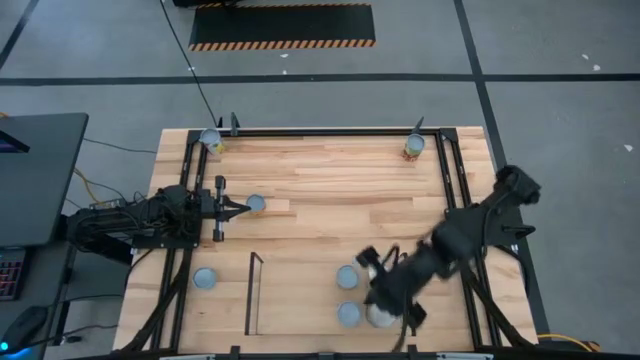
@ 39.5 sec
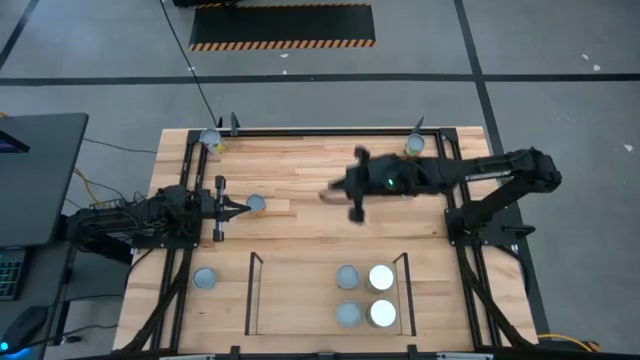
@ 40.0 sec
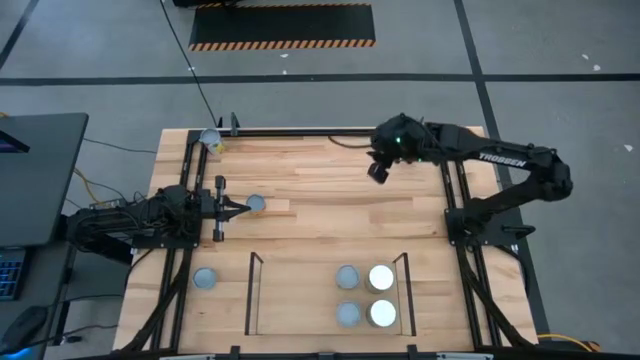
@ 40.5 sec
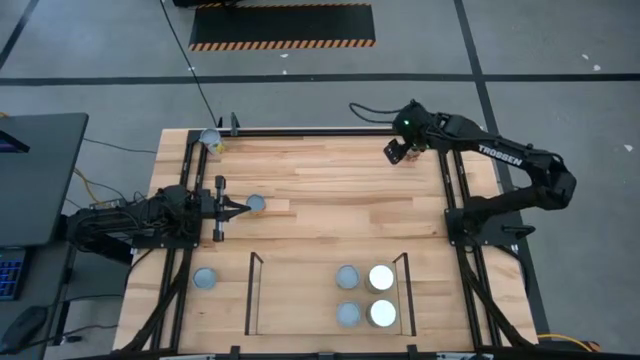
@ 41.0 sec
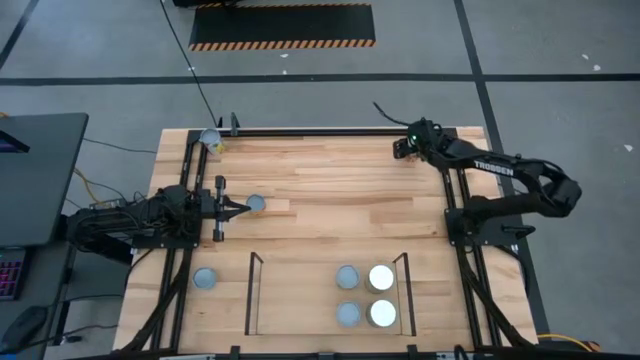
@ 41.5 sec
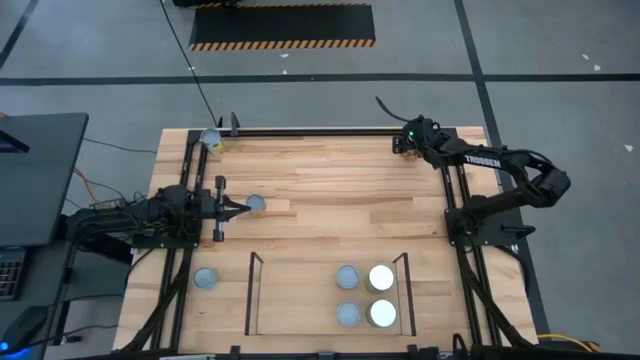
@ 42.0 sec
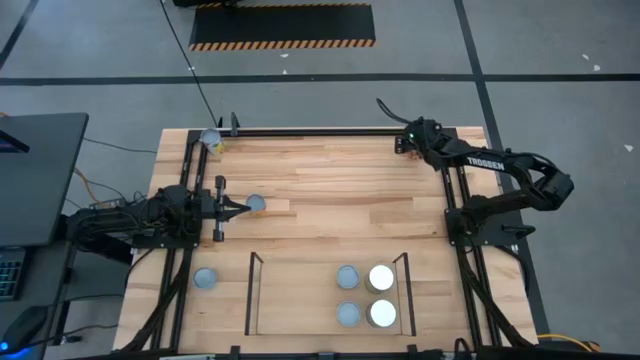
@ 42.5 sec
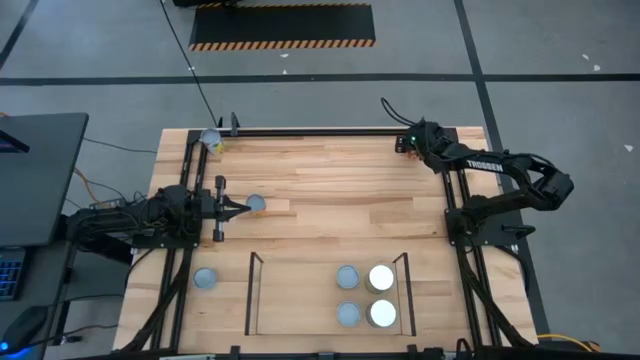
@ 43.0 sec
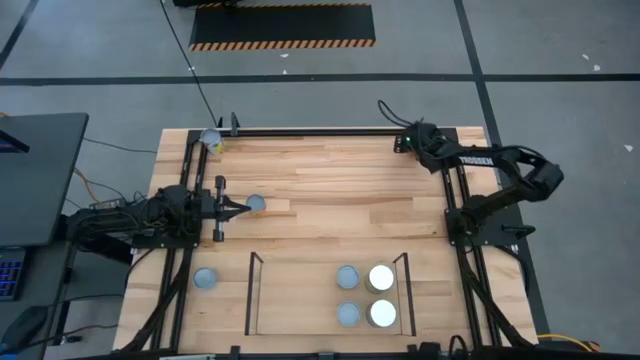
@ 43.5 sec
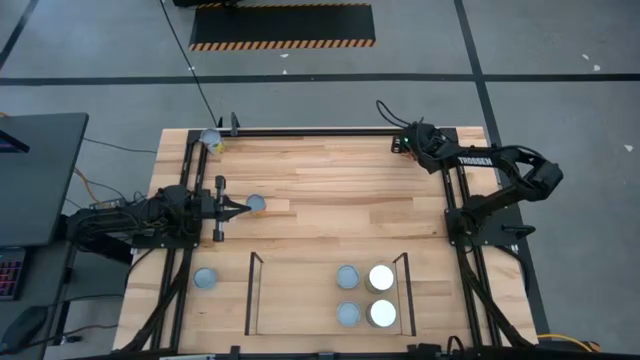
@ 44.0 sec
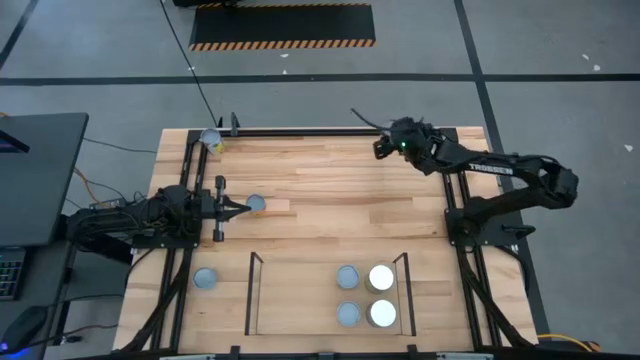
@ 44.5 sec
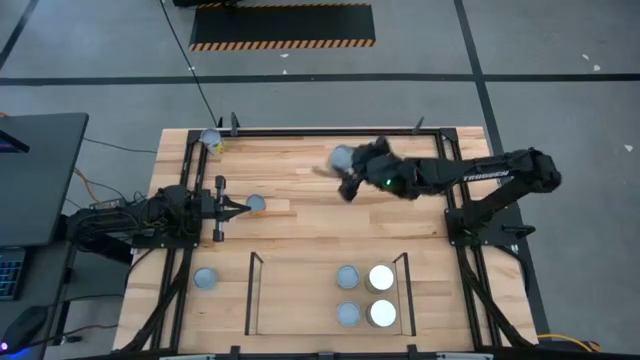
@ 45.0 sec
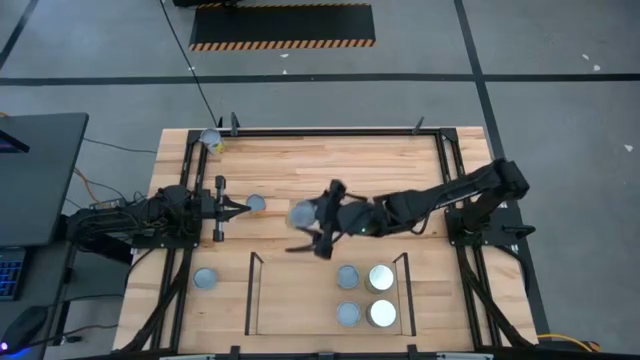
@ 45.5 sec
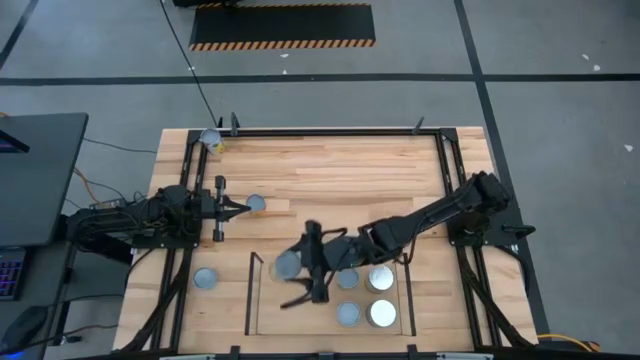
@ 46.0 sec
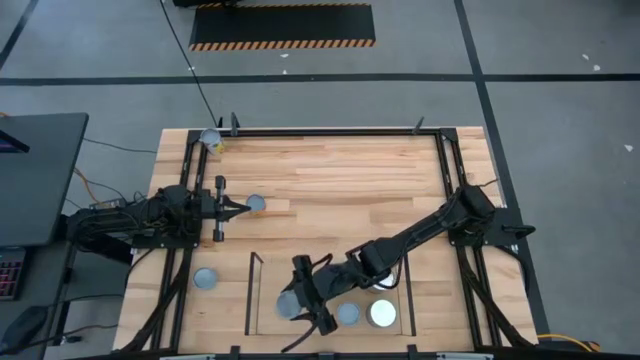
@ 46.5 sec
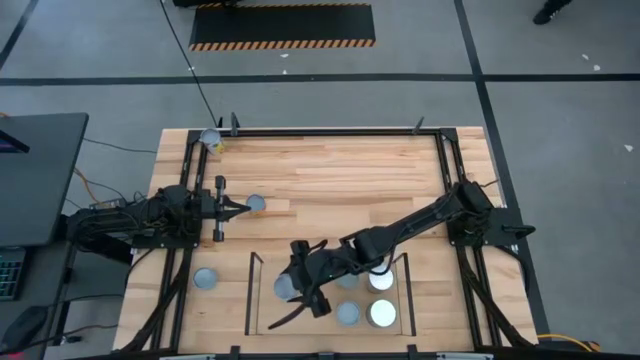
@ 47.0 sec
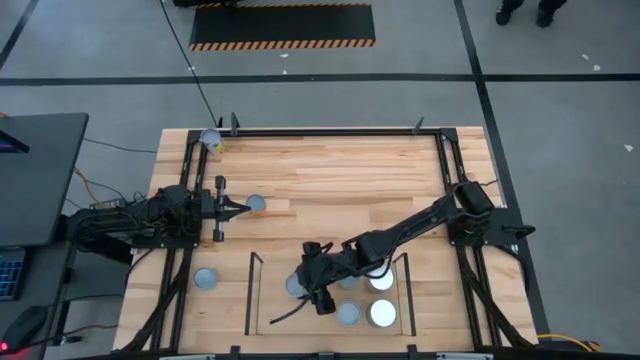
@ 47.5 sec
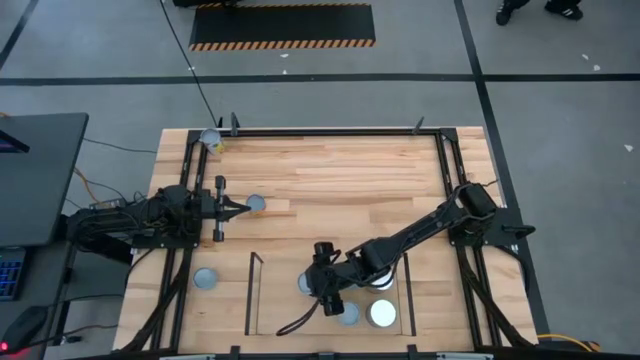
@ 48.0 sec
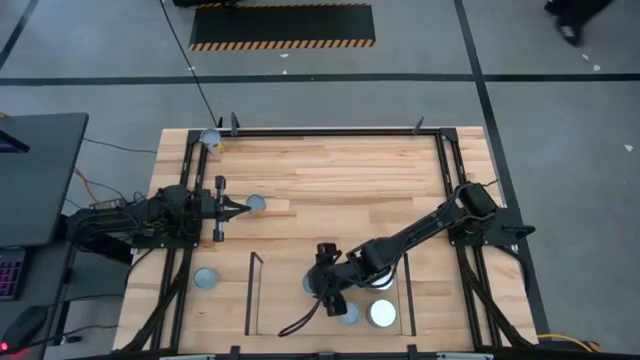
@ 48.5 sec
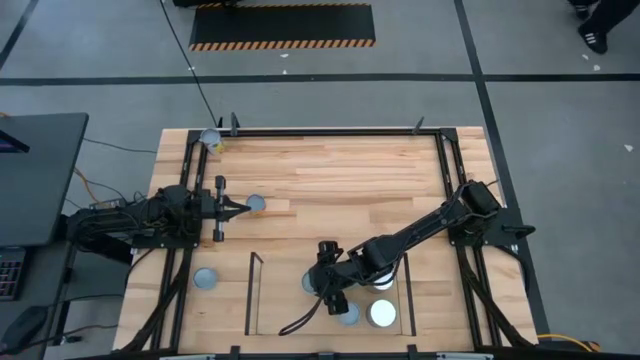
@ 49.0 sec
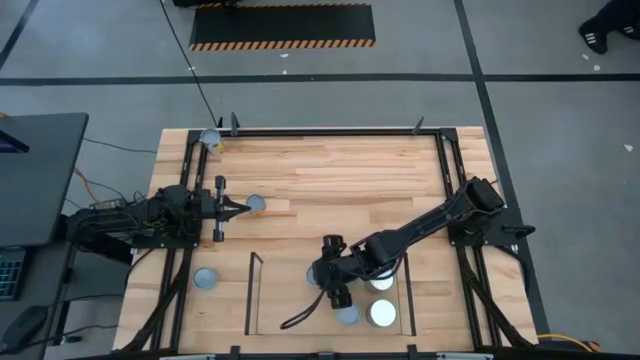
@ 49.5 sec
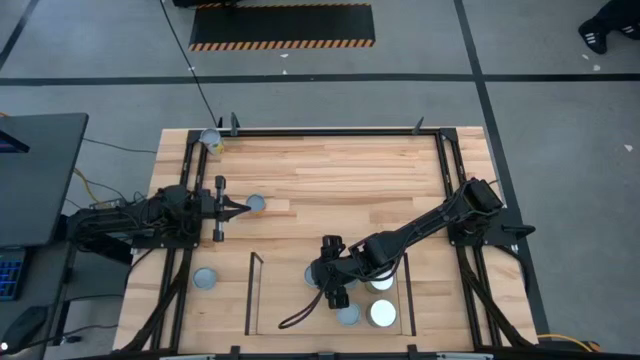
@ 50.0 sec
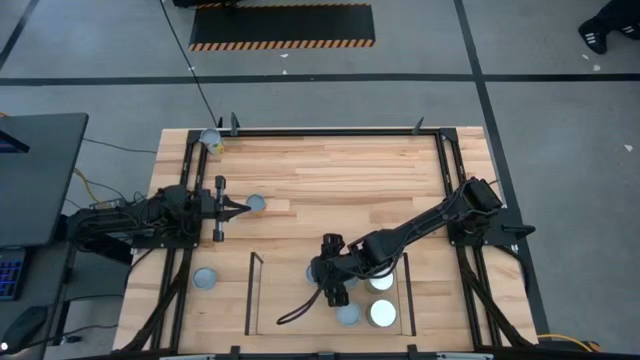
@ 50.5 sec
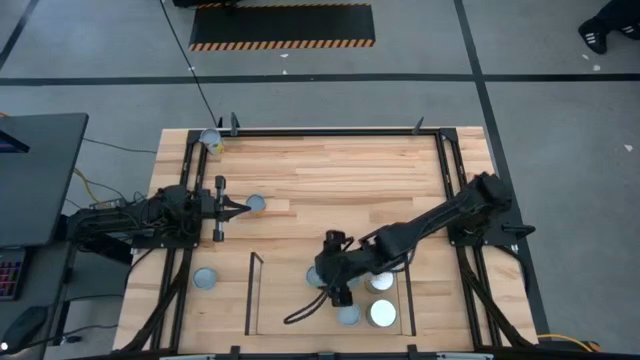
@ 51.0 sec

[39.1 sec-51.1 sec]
Task: Pick and place cans onto a shelf
Put the canned spaghetti sauce on the shelf

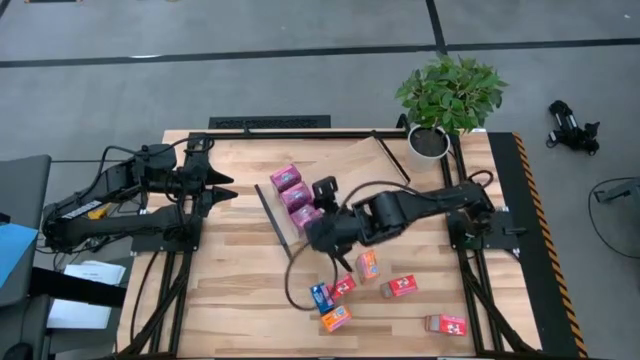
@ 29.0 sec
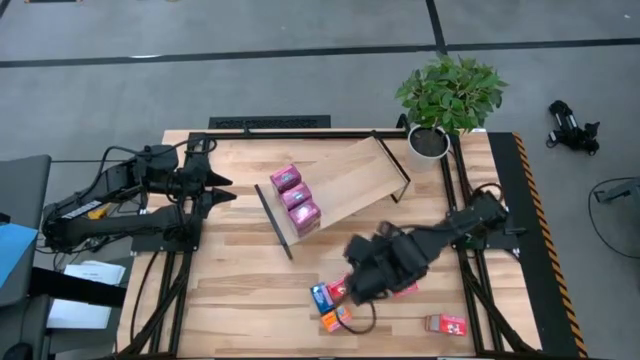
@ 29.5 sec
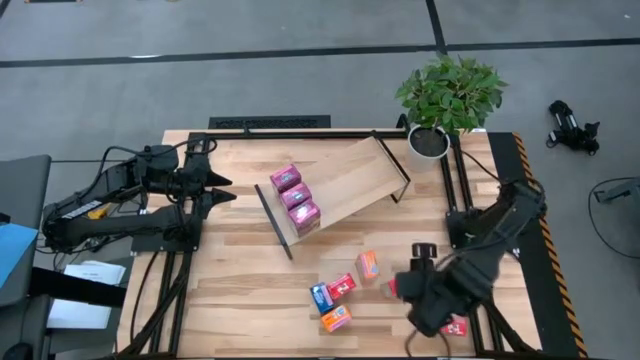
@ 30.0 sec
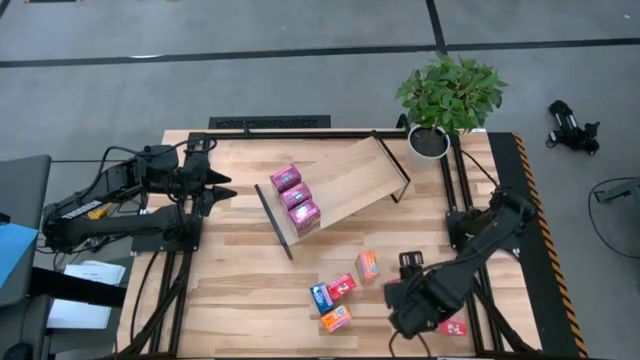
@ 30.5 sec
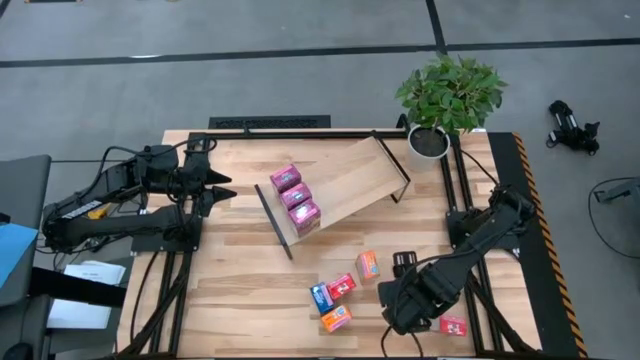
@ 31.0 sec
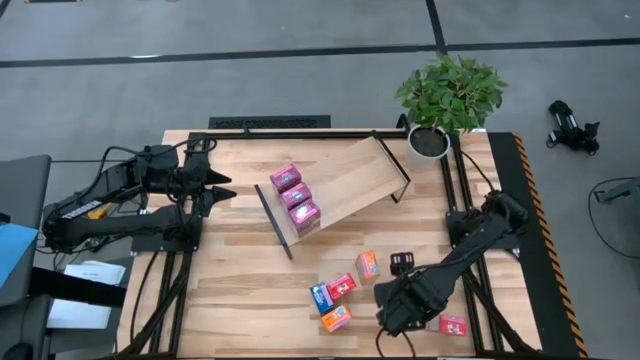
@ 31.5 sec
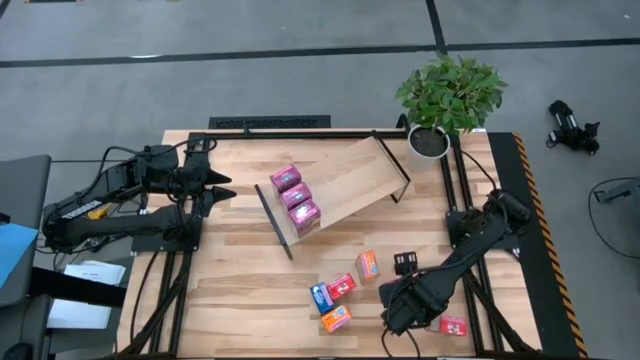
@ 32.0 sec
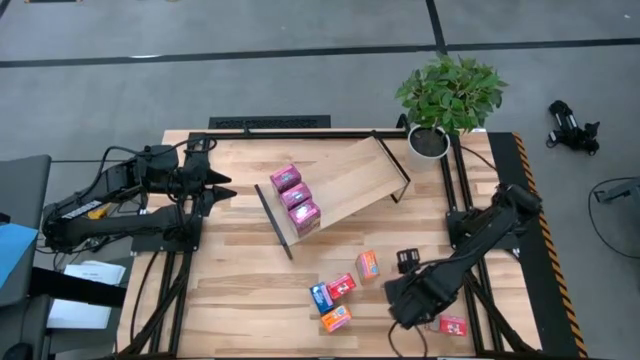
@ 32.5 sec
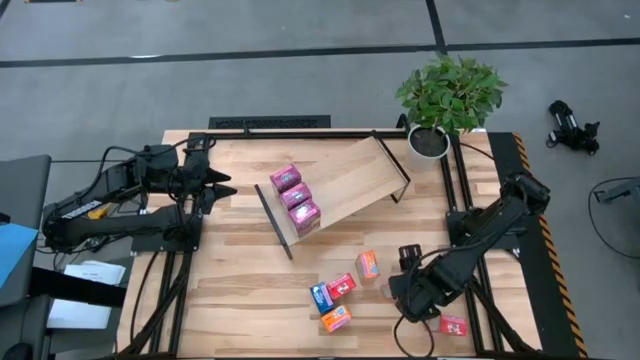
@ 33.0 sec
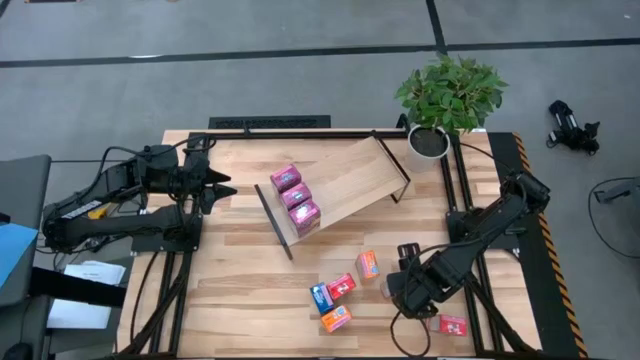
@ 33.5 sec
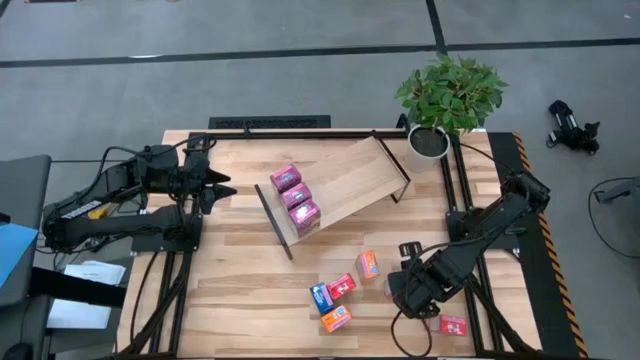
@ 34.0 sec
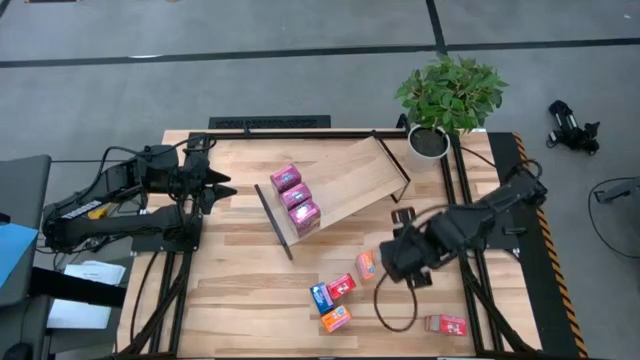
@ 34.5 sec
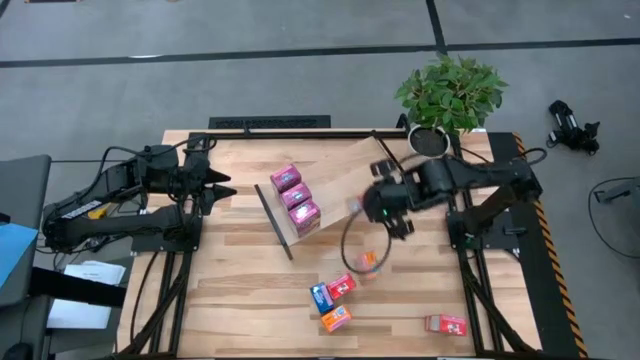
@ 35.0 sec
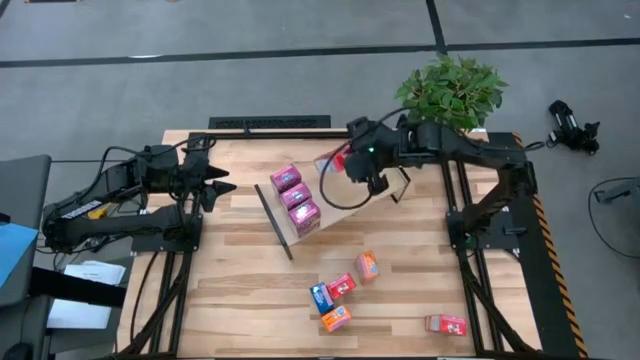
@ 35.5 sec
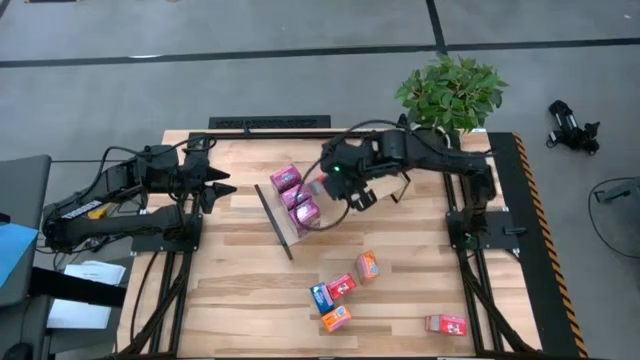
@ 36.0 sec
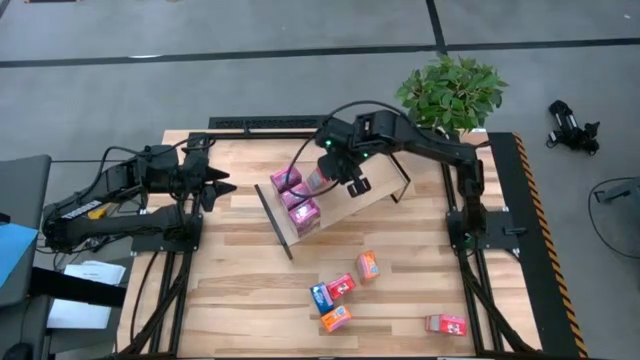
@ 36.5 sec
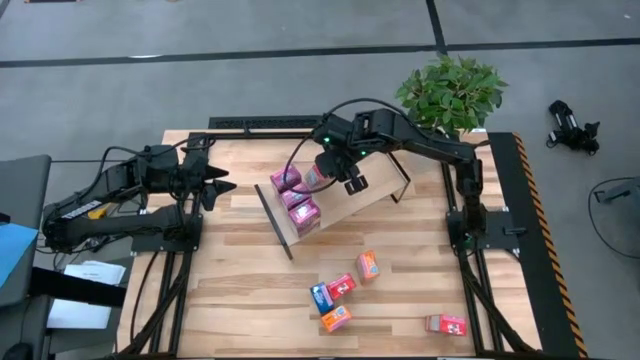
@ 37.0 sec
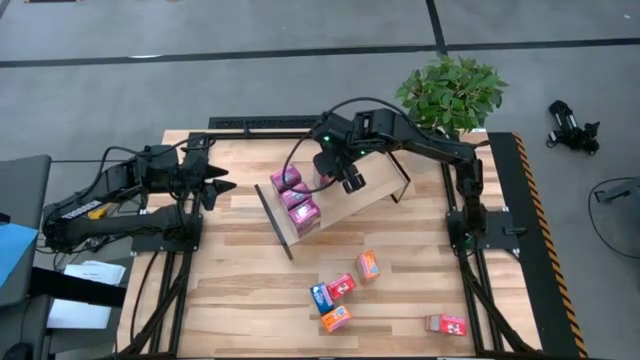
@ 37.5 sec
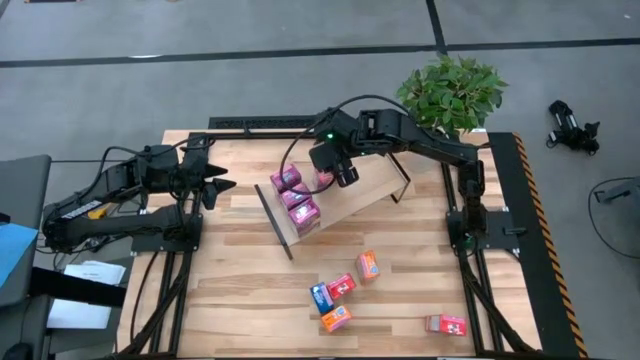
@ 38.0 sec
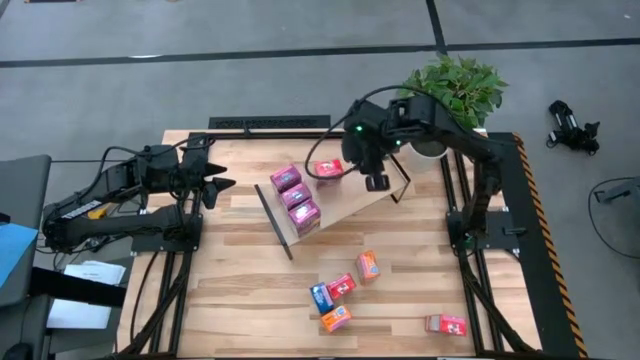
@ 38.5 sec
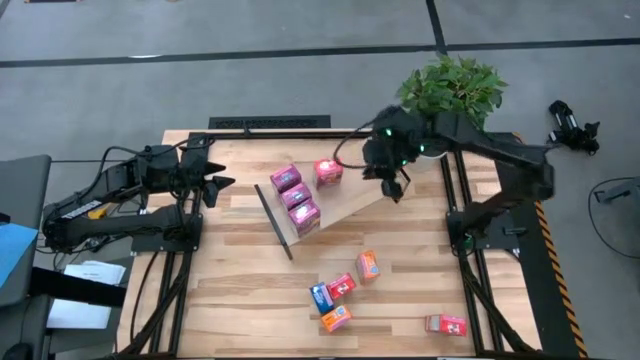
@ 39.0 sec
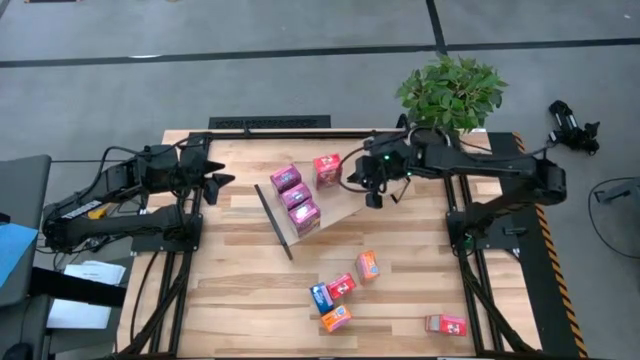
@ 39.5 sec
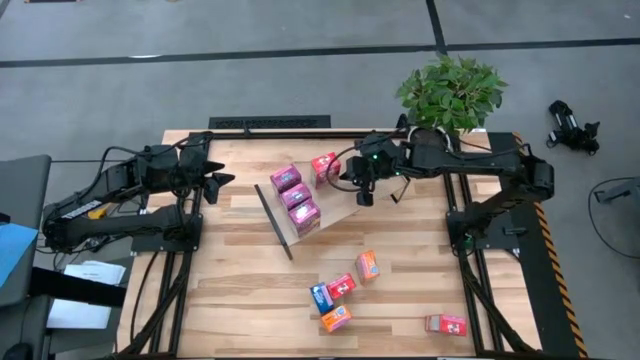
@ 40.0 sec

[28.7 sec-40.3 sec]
Task: Stack cereal on shelf
Put the middle red cereal box on the shelf
